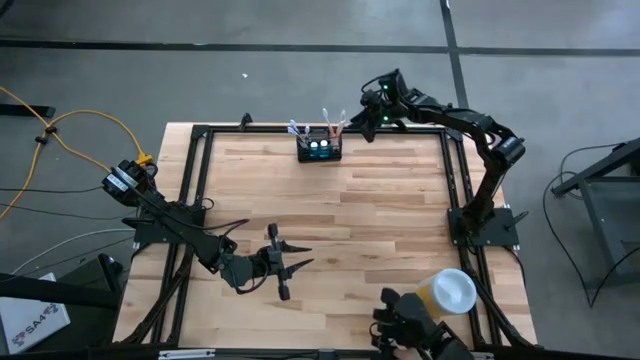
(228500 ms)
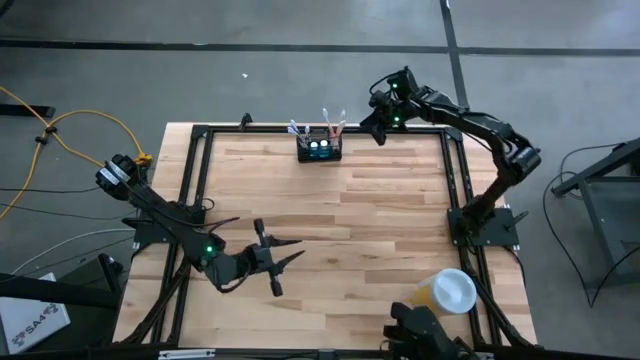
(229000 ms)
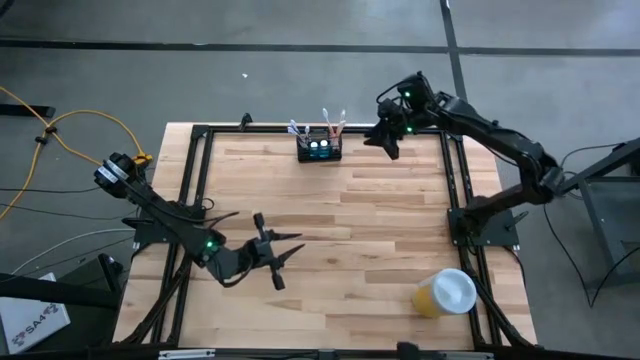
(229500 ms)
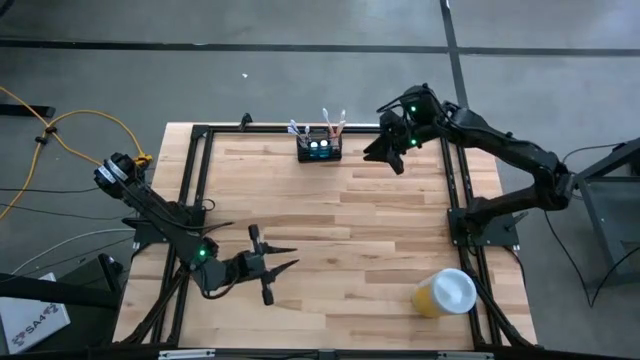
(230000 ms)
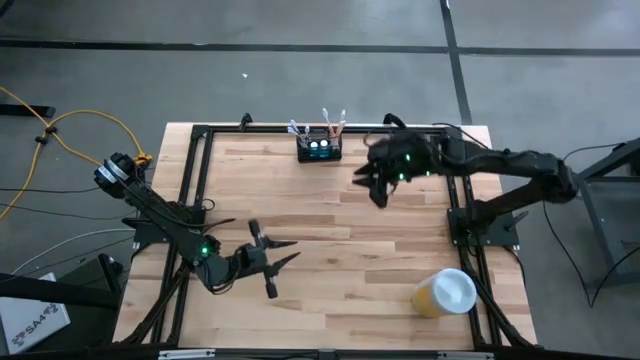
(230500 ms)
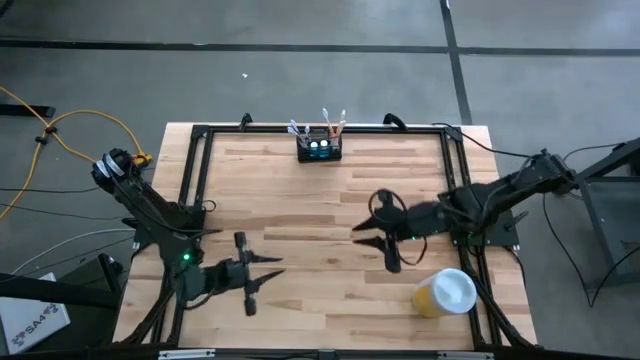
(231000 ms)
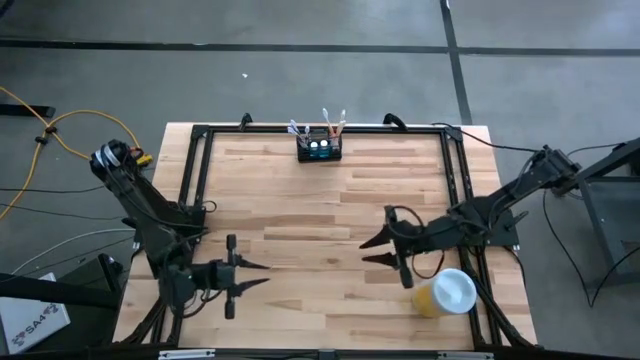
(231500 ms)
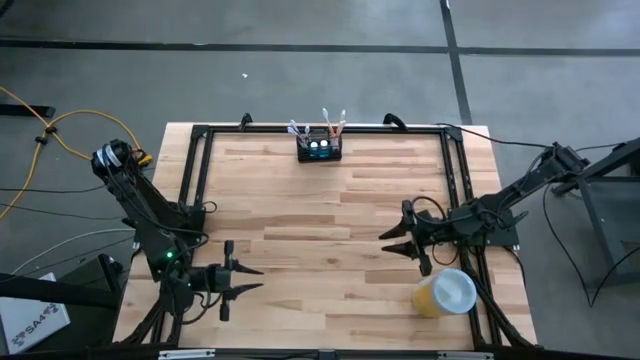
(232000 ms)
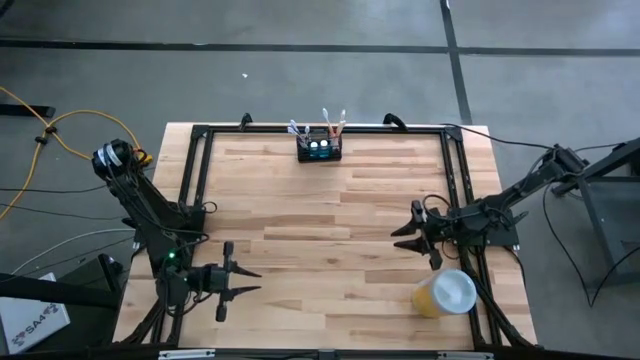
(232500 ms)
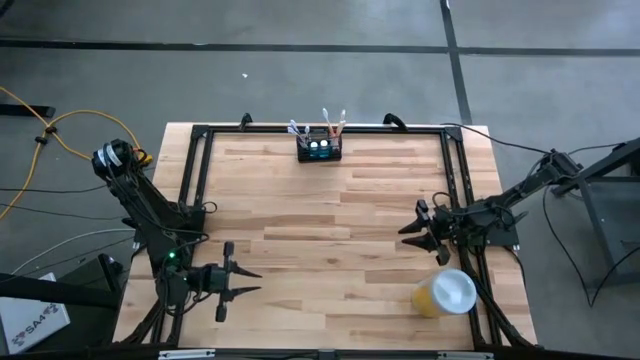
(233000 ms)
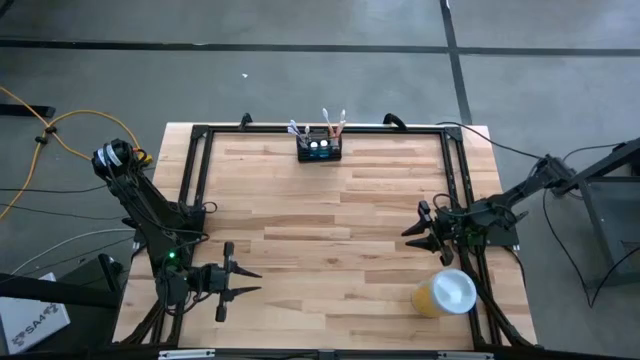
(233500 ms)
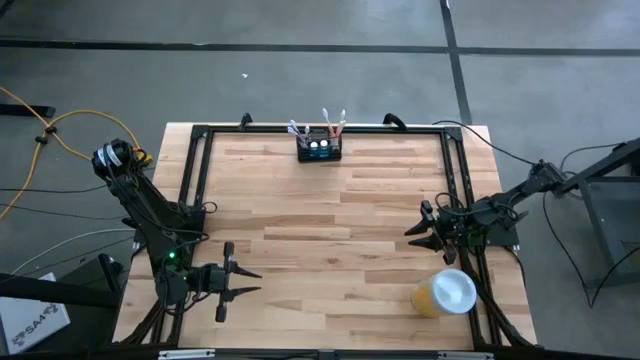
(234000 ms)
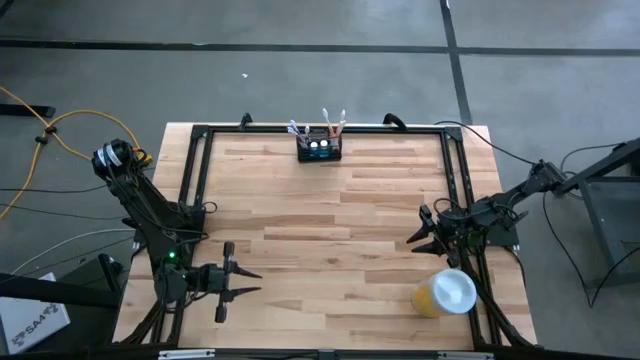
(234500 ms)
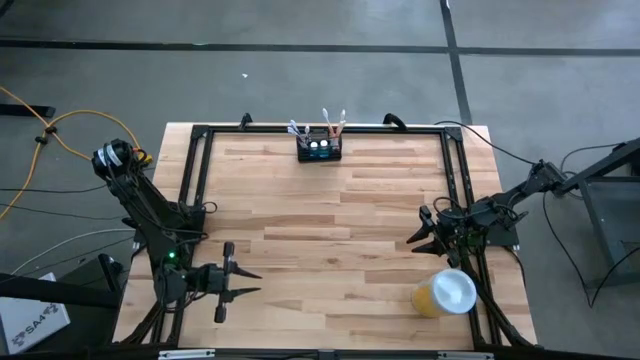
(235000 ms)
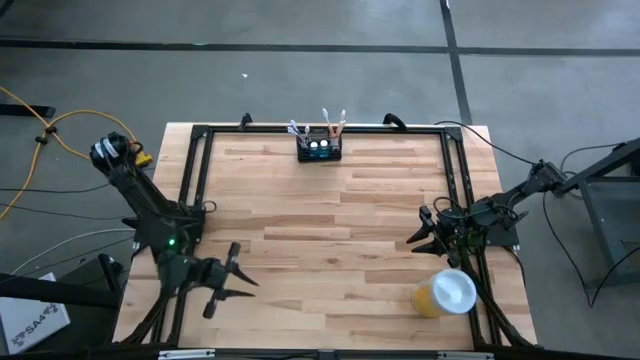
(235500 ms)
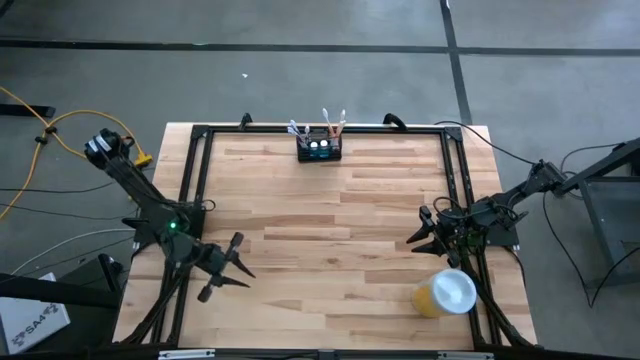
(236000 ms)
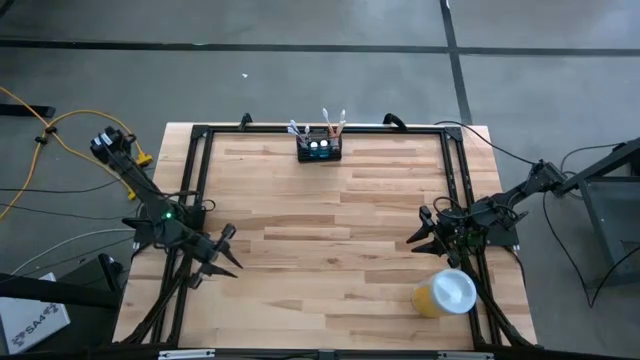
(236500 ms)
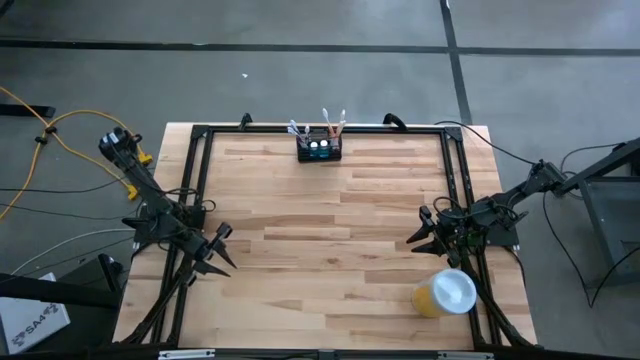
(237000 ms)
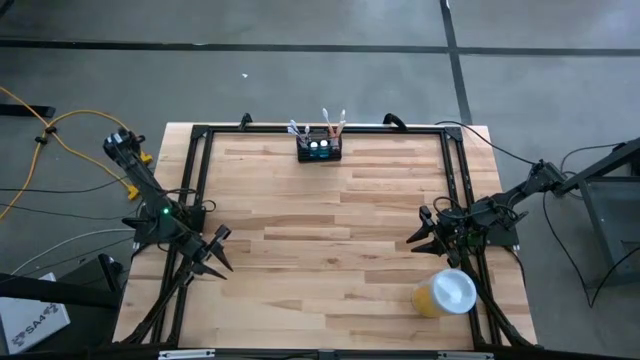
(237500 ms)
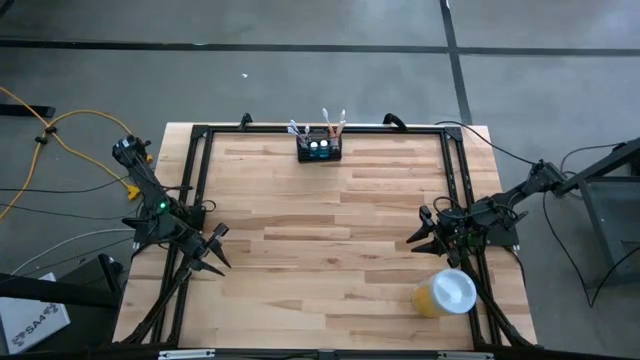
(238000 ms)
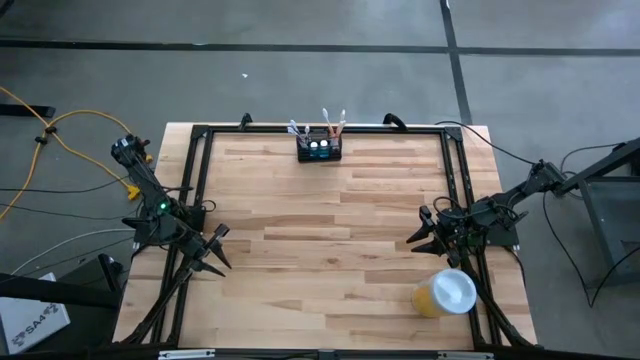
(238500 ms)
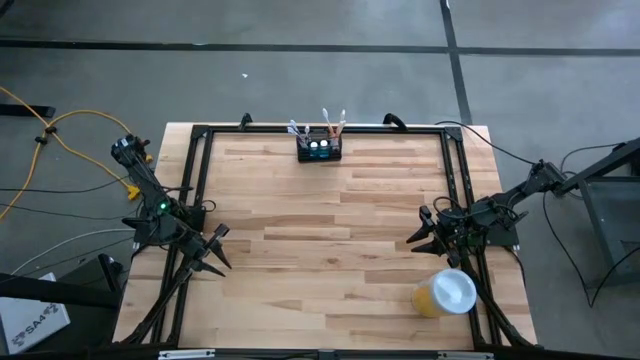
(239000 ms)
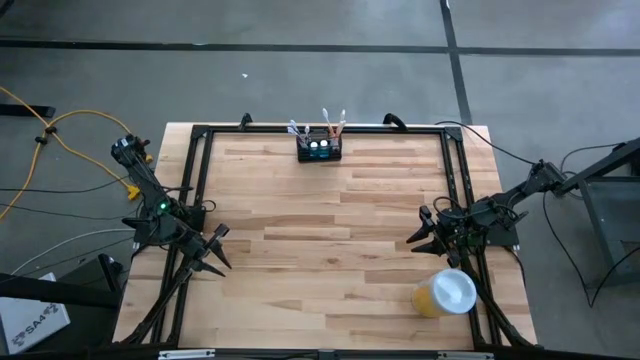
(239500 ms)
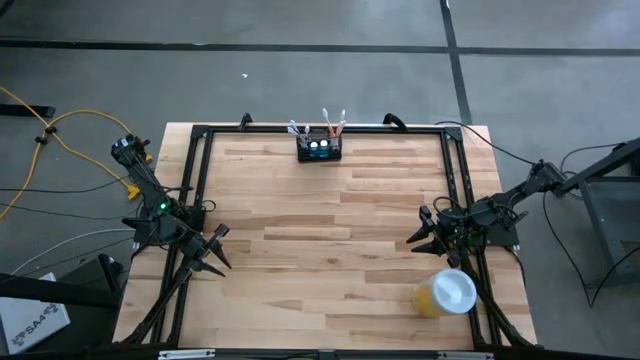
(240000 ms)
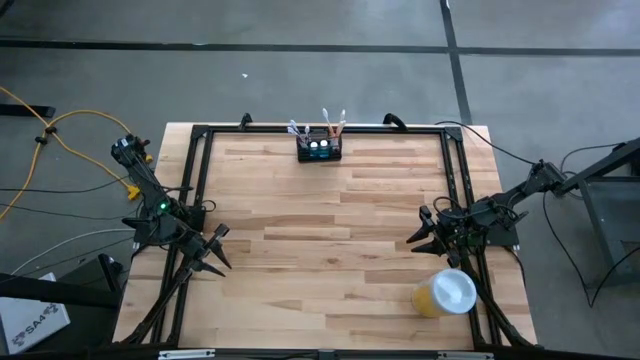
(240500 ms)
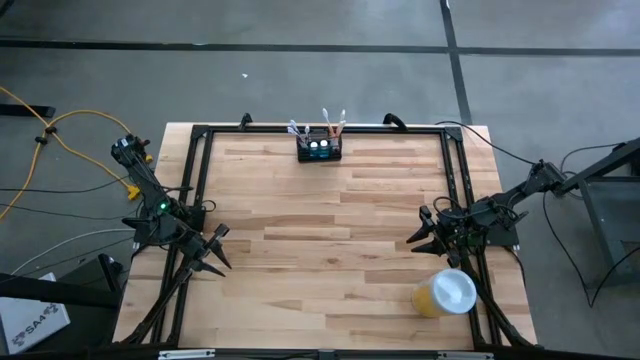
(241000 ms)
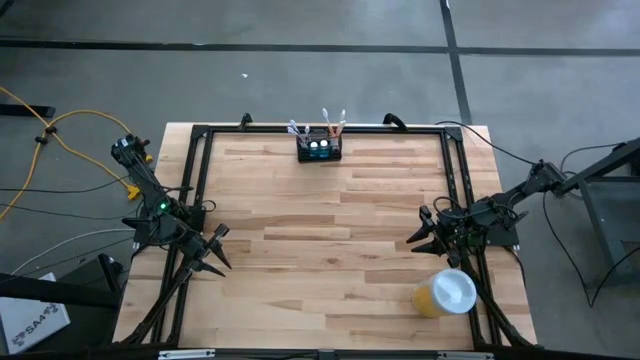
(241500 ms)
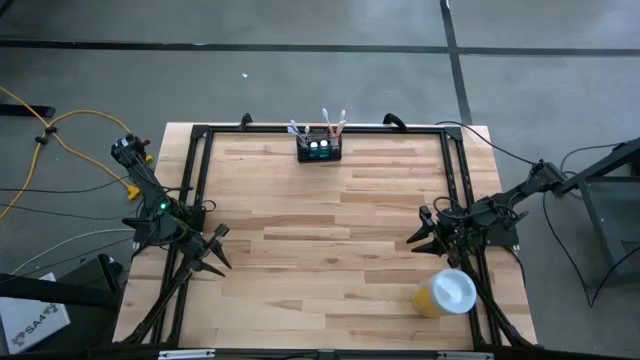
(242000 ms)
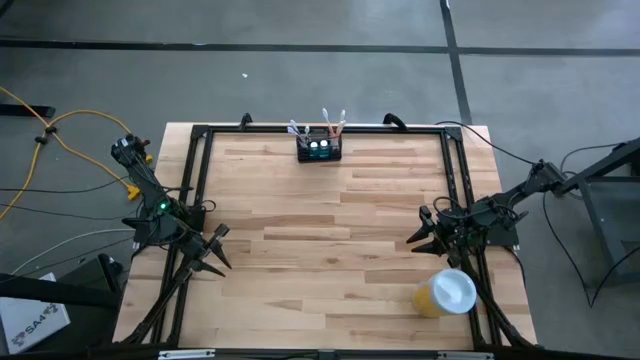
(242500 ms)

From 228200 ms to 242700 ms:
Task: Pick & Place toothbrushing station
Return to Home Position

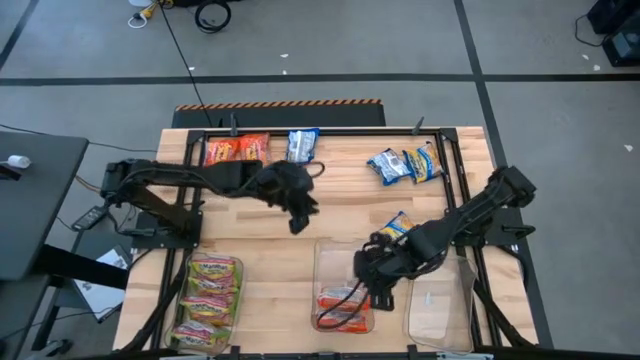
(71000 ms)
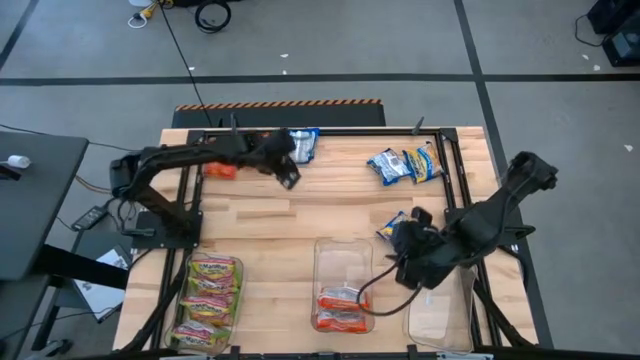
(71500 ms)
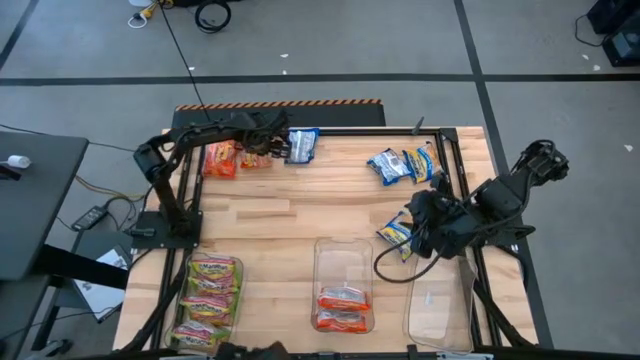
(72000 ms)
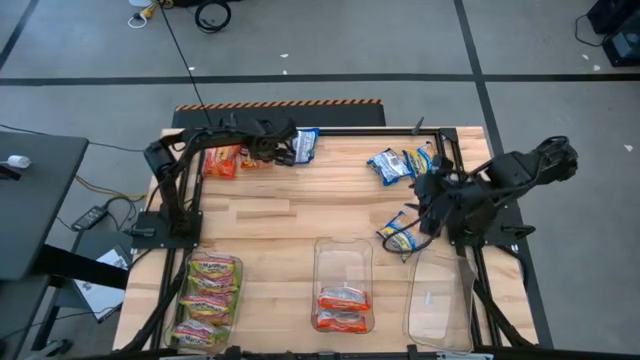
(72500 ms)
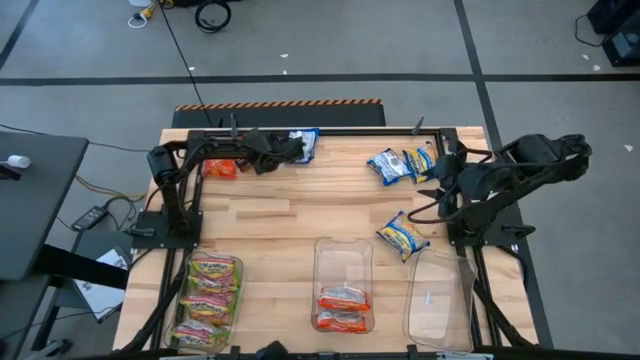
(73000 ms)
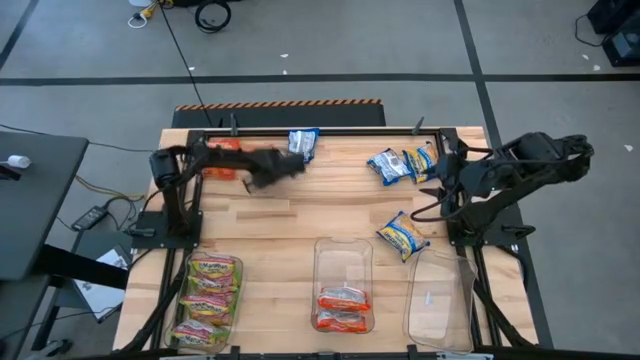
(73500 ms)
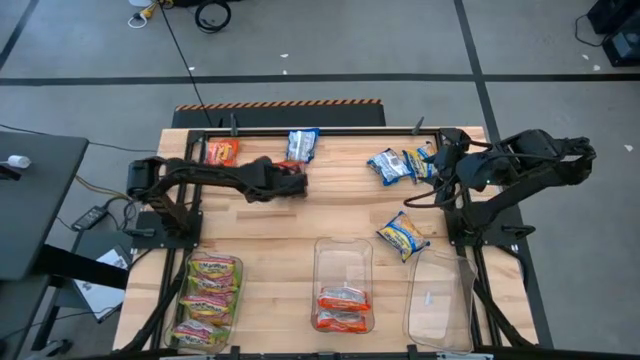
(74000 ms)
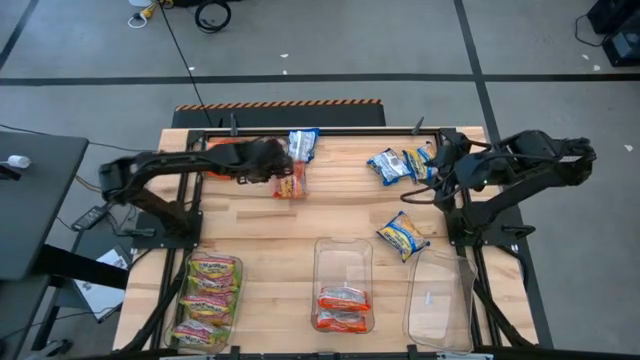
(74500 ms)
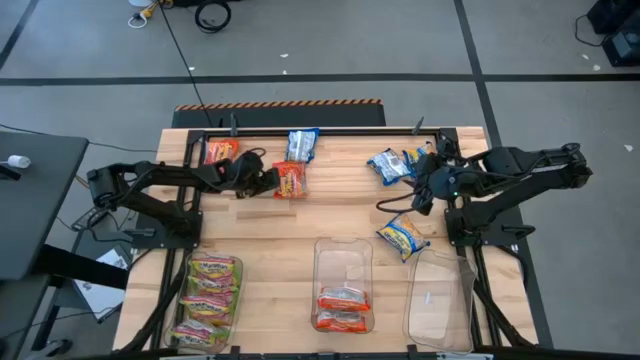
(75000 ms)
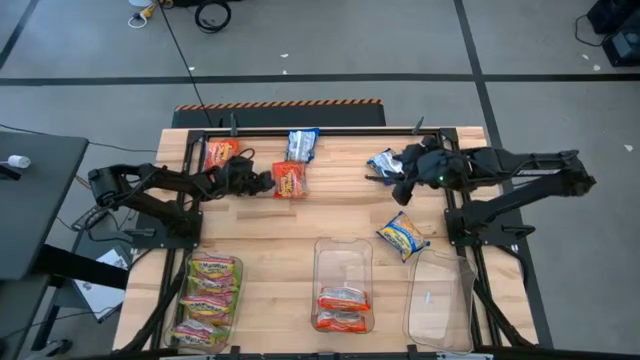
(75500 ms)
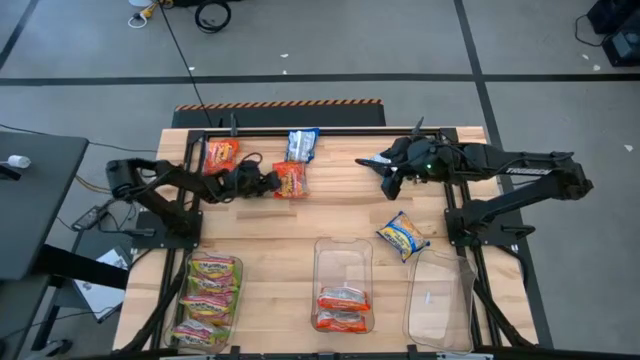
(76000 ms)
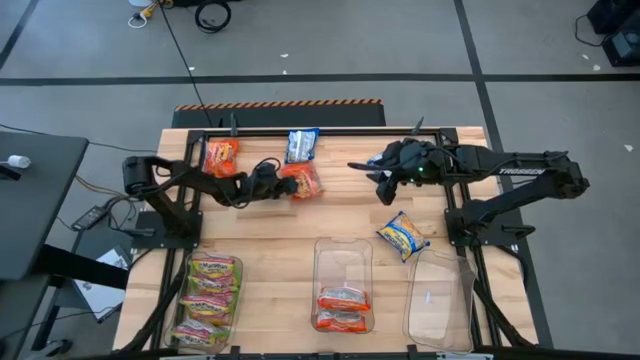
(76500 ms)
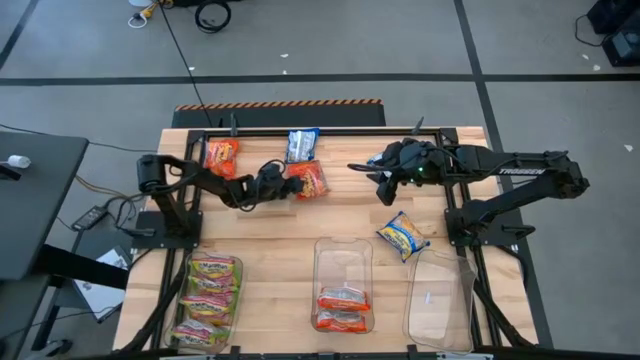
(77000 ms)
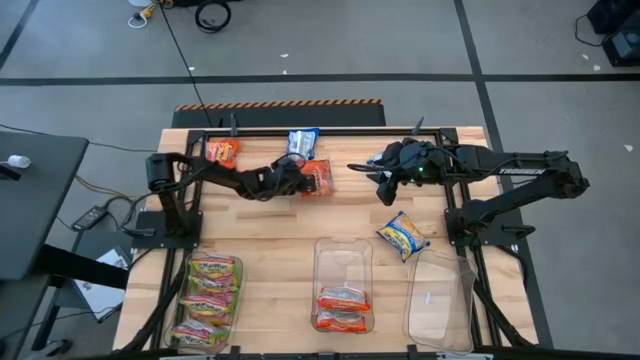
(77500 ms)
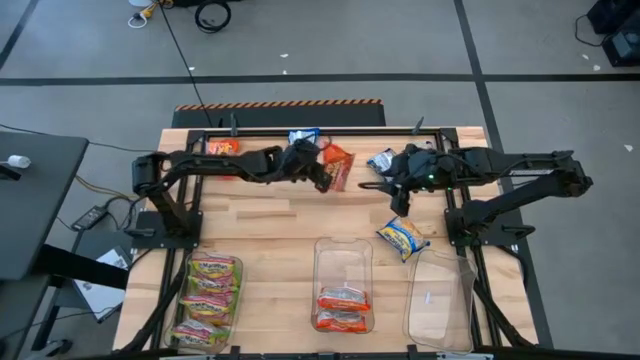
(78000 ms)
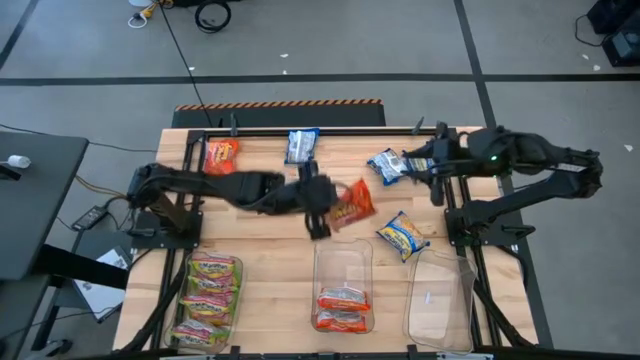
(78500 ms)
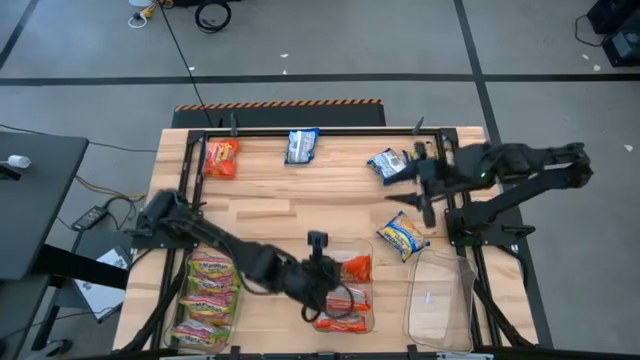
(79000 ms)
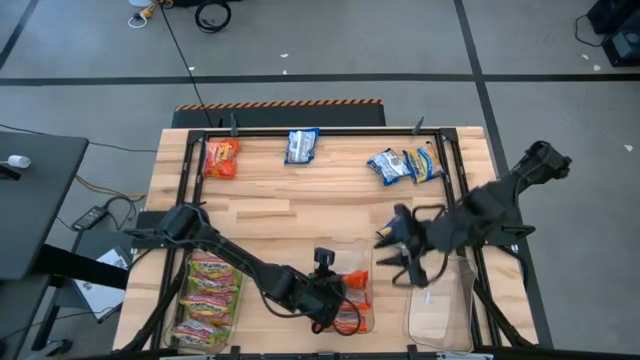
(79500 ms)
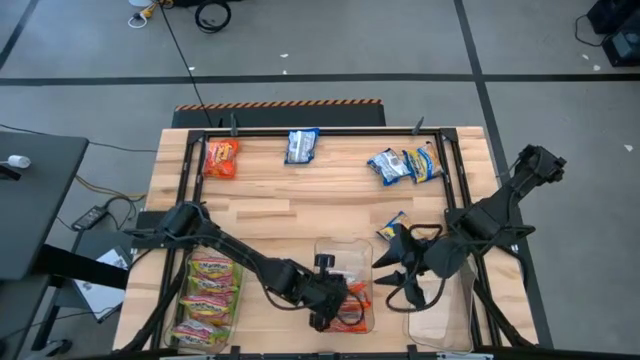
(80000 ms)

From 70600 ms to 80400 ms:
Task: Sort Maruchan noodles
Put the orange noodle pack into the middle transparent bin
